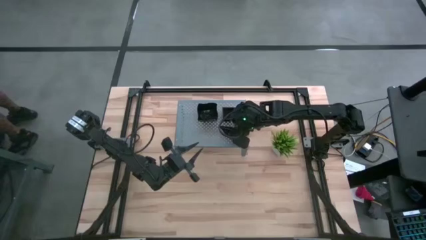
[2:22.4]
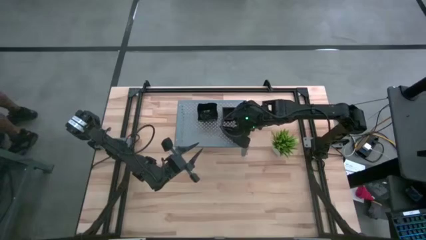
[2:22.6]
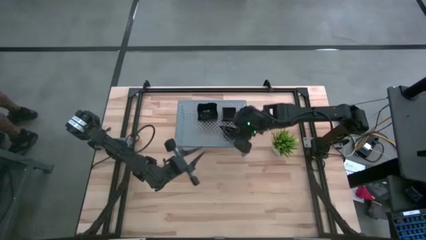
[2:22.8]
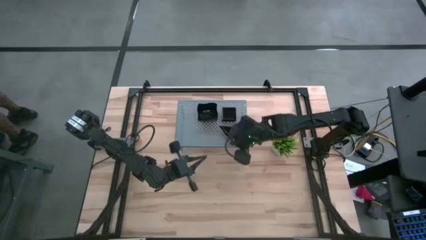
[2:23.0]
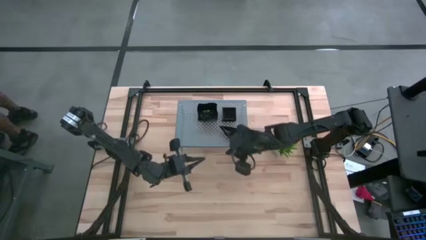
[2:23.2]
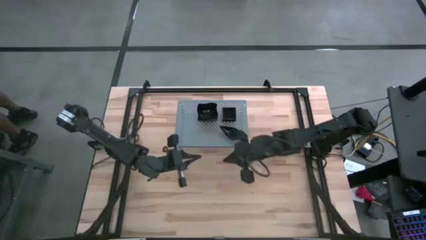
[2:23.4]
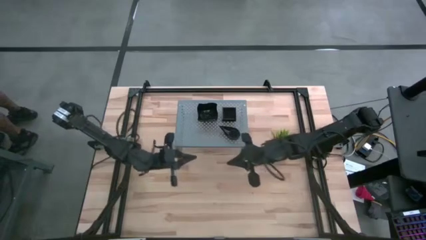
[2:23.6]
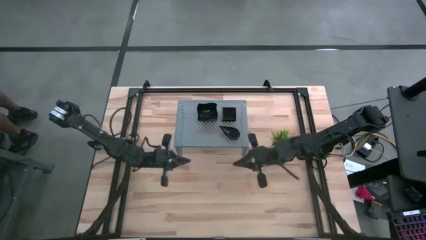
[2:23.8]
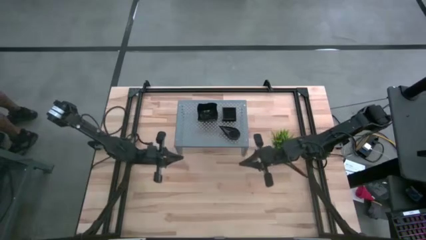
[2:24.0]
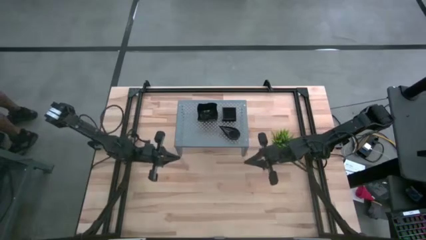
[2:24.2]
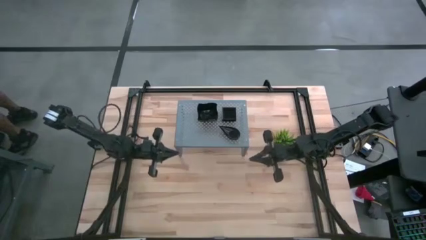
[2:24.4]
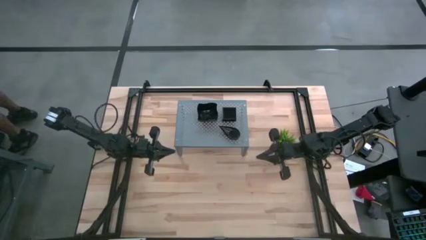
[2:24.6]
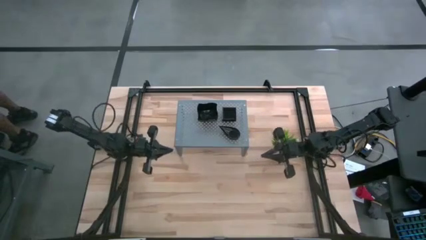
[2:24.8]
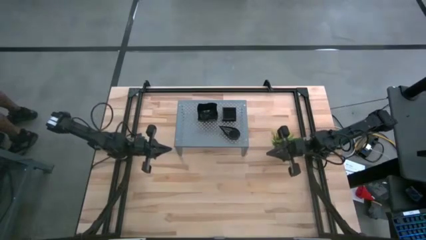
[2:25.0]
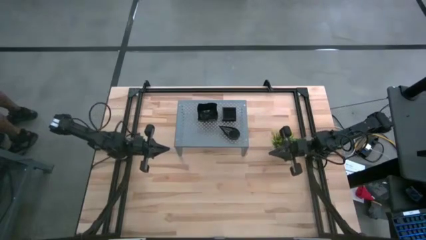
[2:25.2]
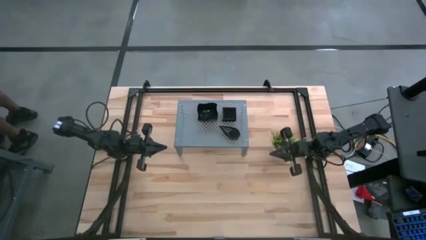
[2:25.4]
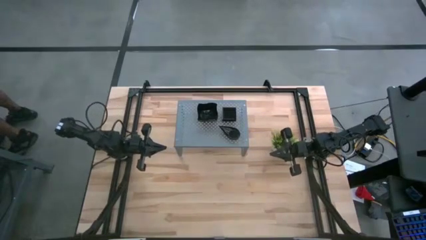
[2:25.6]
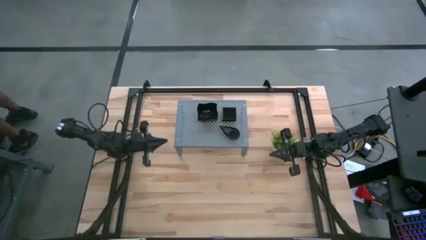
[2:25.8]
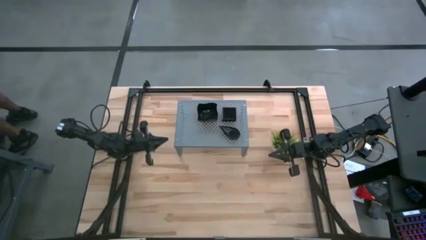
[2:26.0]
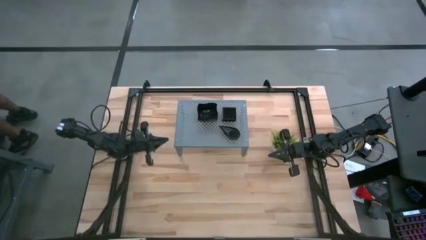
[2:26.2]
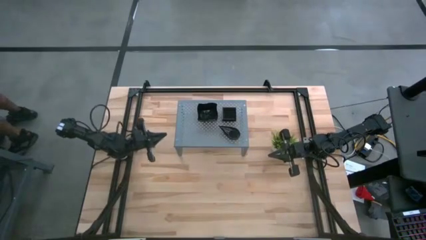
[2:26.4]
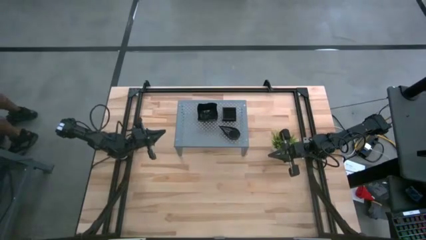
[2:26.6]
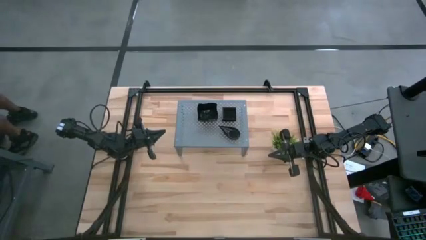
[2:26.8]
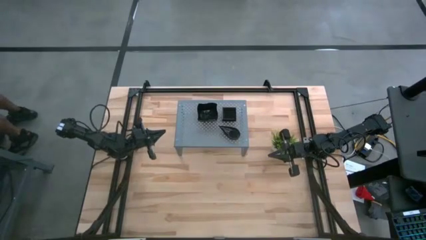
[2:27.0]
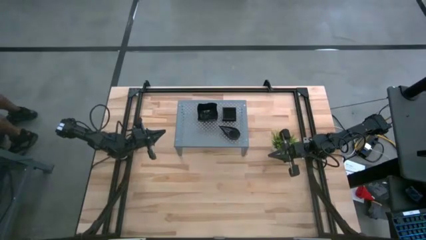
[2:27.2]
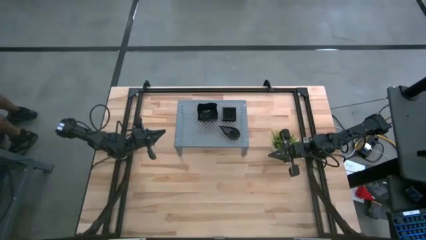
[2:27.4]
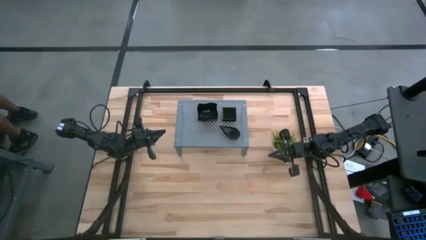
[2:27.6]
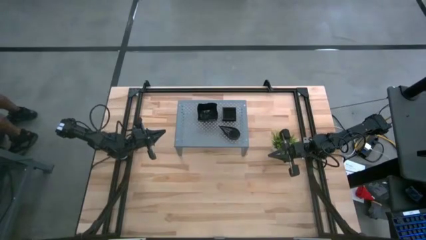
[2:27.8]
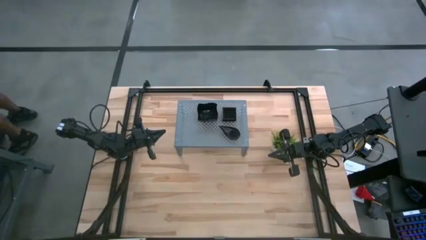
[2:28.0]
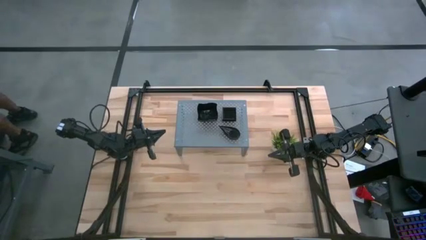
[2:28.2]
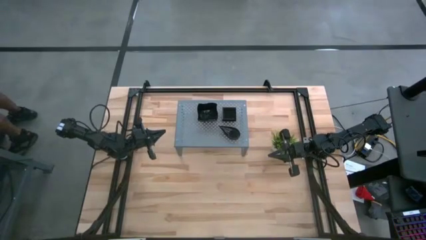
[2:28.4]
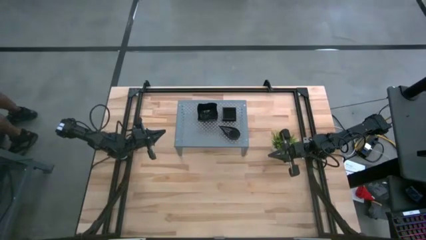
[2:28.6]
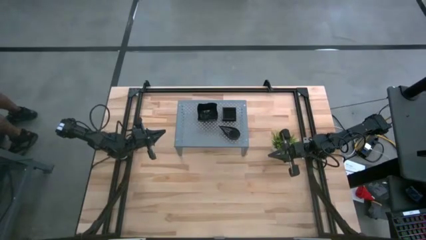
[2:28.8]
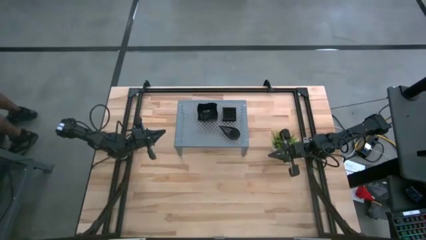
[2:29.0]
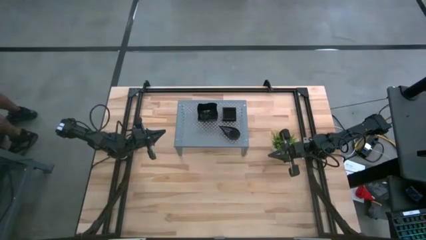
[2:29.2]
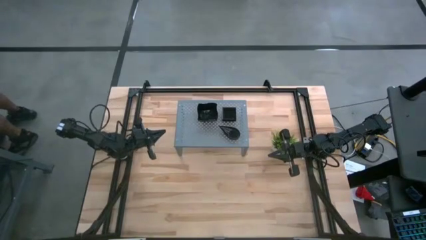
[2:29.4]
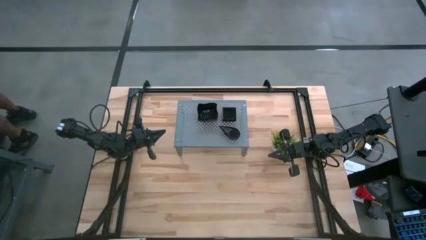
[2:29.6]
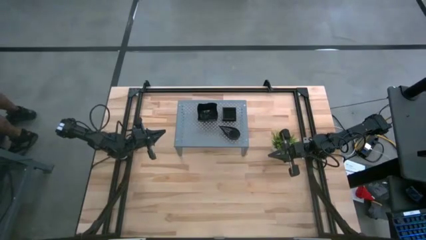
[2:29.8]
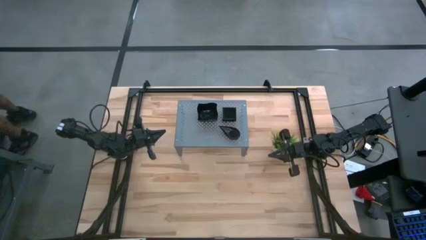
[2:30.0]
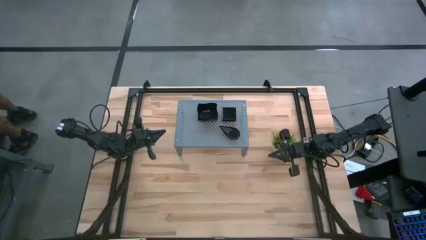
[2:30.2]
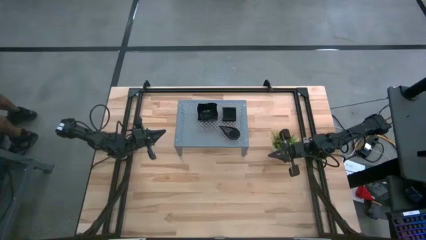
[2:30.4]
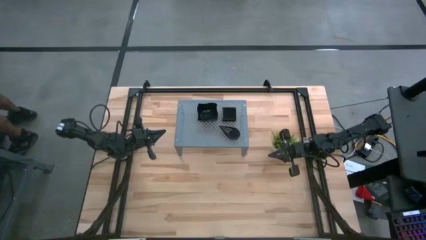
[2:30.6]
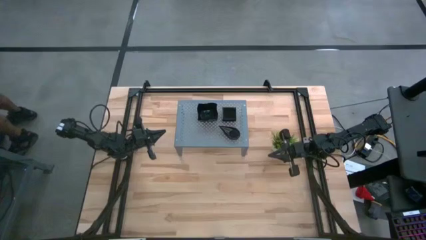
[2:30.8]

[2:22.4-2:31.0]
Task: Pick & Place Mini shaped plates
Return to Home Position

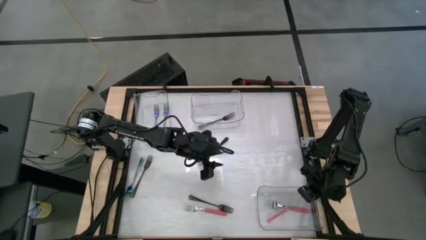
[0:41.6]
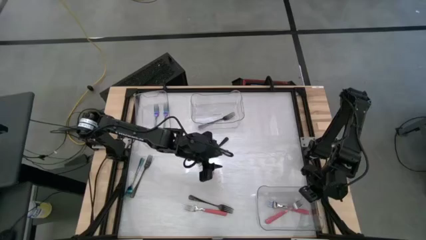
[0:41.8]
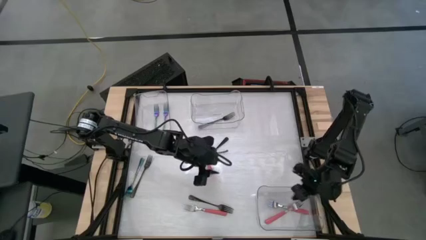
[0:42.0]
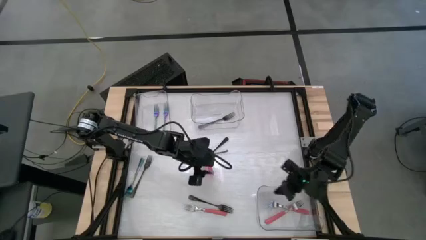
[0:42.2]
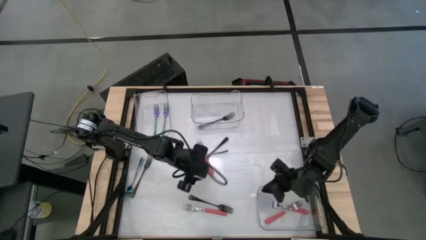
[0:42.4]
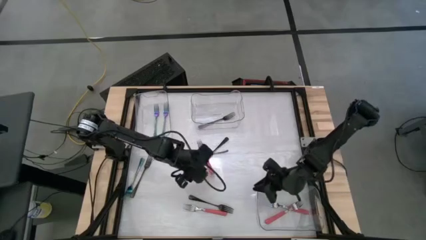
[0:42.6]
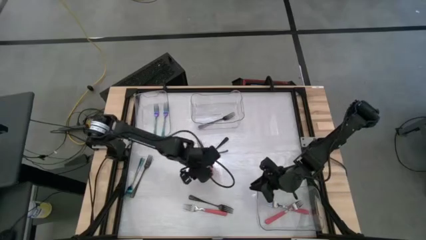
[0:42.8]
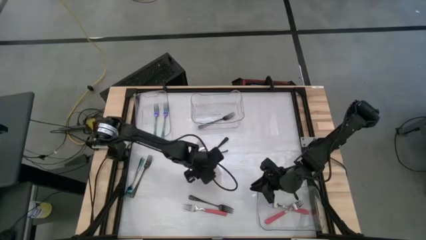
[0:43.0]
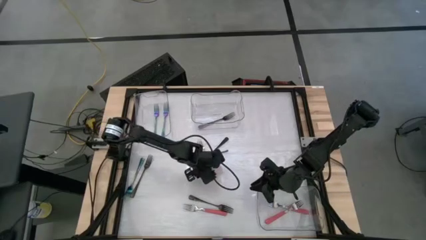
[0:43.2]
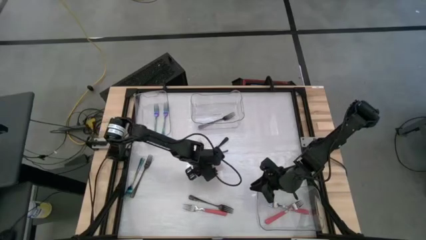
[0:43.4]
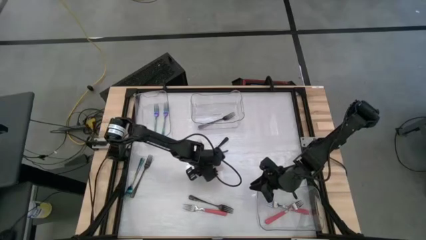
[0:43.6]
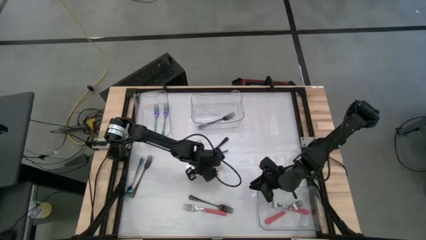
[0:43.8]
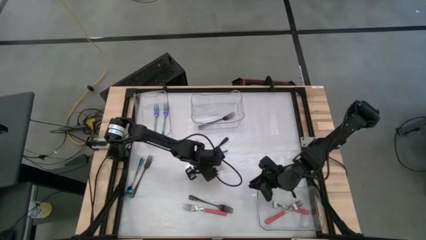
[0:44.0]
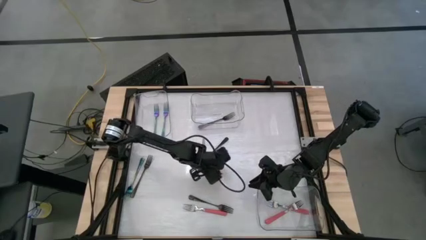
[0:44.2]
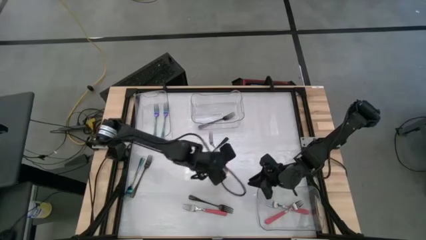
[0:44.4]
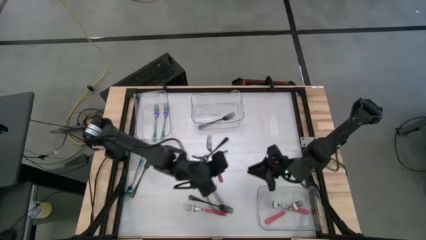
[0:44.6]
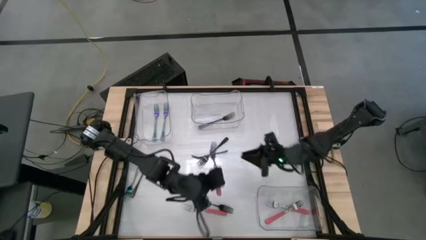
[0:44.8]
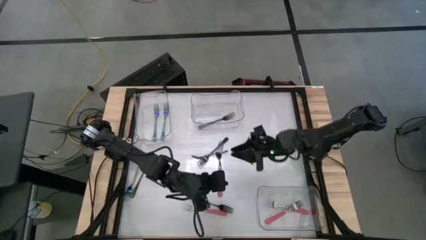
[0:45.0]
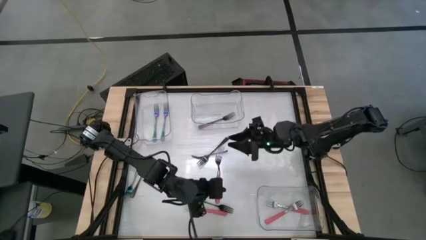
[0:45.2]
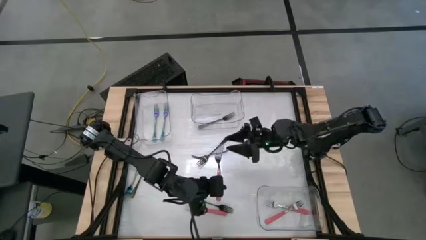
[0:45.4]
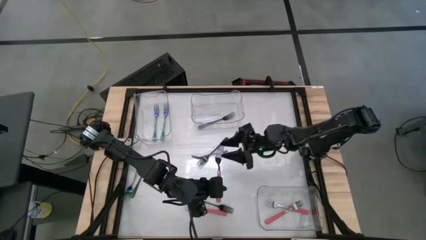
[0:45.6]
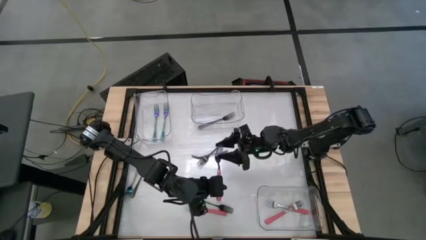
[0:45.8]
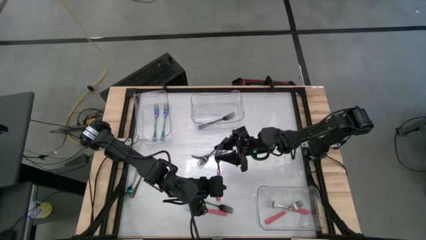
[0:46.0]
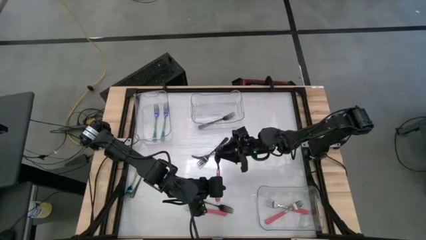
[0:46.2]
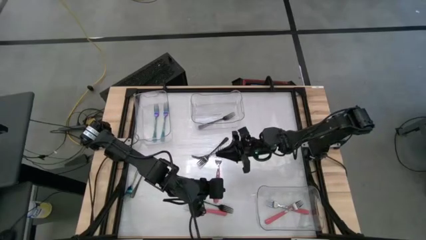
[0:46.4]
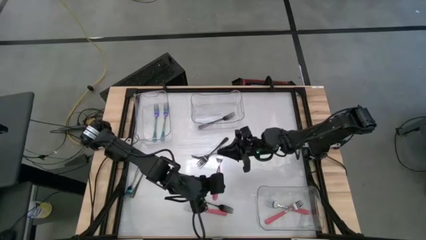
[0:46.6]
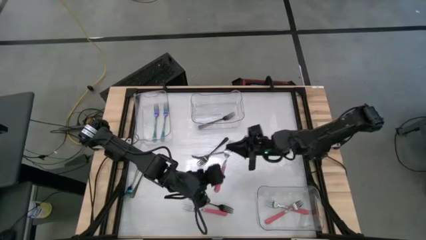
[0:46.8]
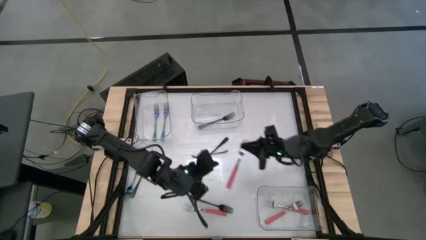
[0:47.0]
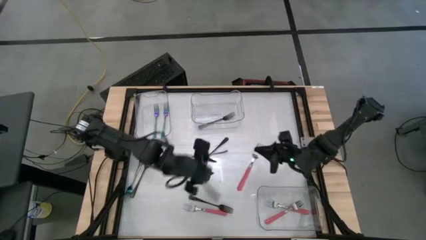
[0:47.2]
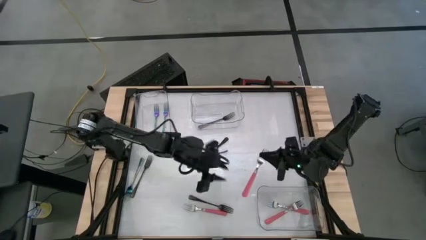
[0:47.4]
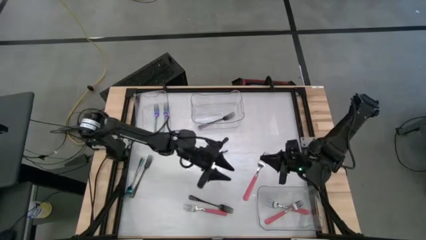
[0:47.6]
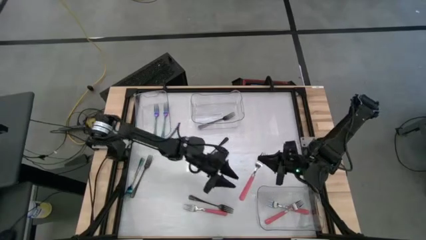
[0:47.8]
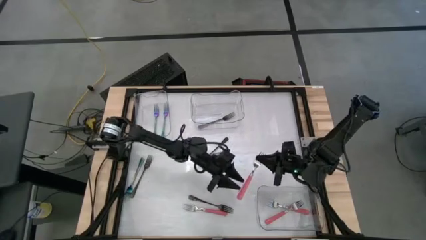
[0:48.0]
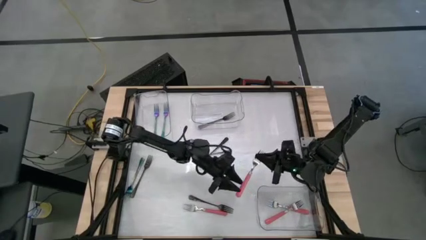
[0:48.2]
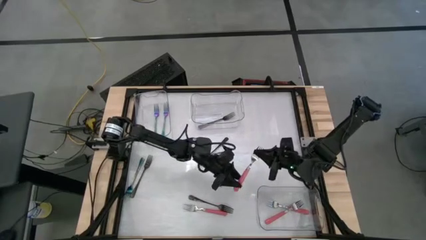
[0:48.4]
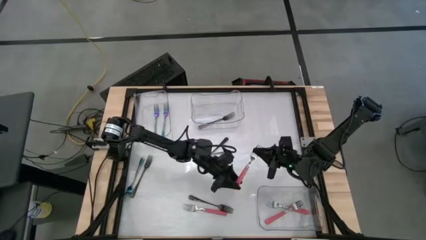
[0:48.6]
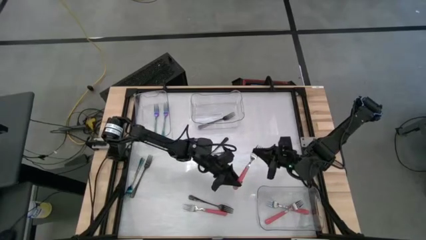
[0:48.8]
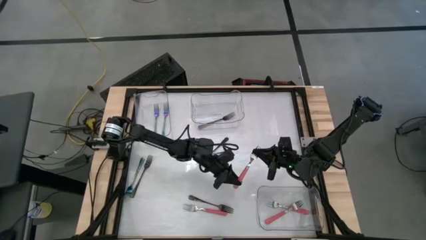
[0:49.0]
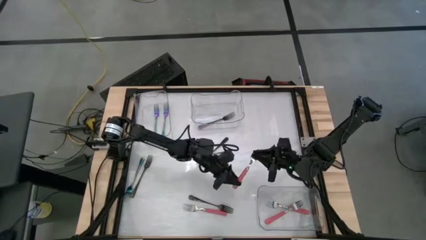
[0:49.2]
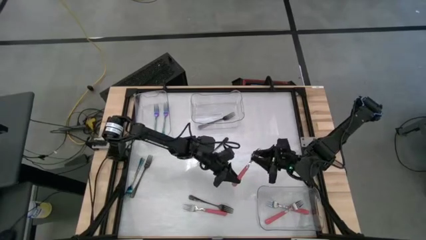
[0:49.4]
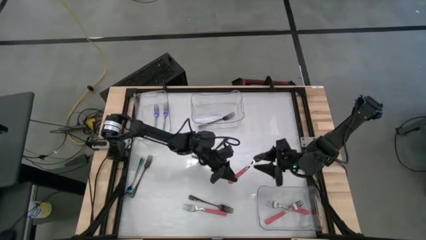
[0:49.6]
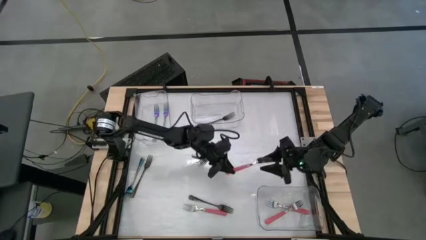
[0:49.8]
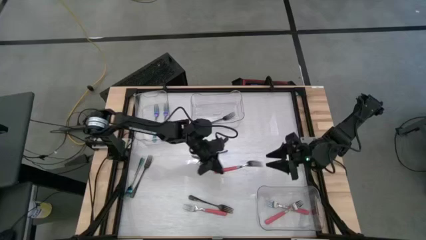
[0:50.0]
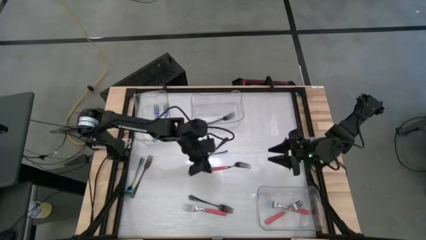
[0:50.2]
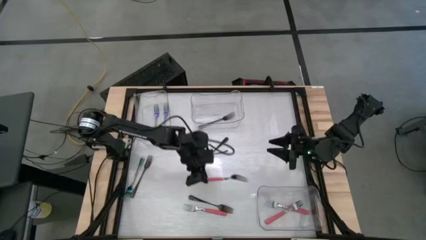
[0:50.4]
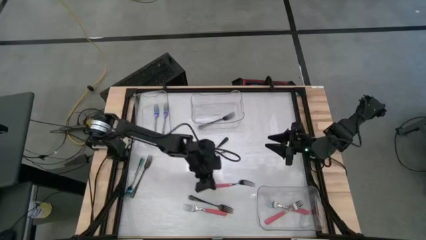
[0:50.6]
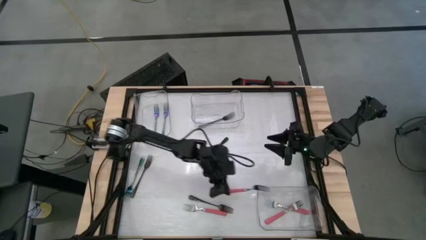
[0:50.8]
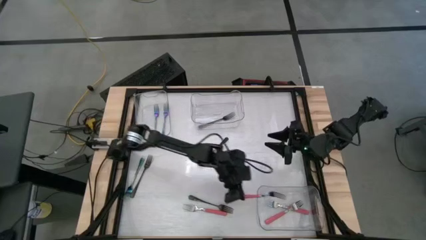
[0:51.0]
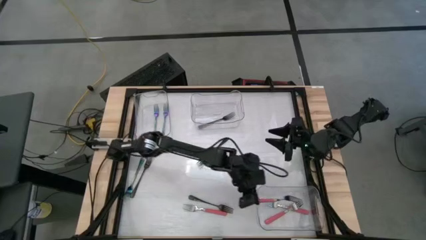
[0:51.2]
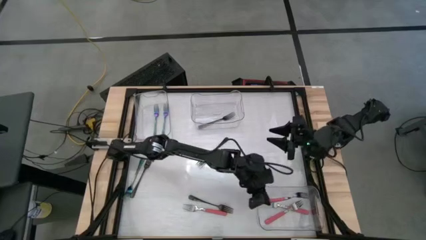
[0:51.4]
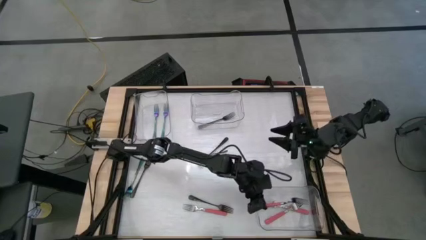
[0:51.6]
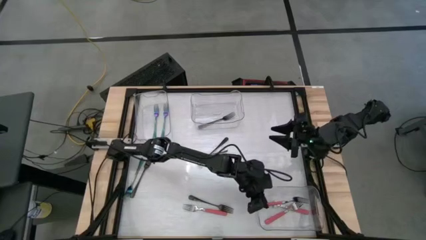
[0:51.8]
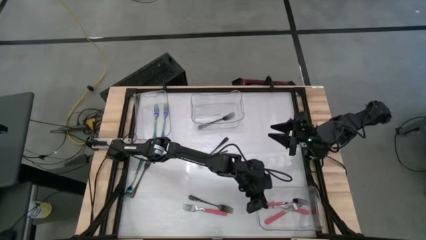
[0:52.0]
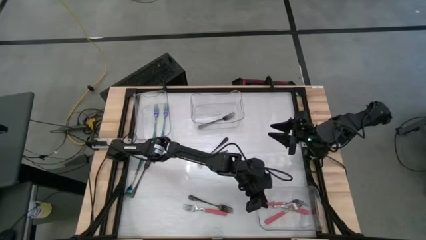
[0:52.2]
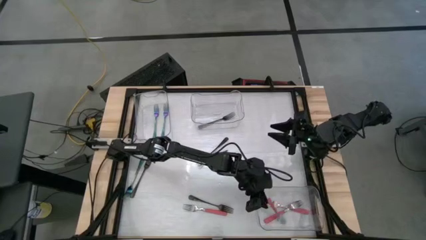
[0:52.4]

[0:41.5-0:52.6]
Task: Sort silverware by color (type)
Put the pink fork into the bottom right transparent bin
